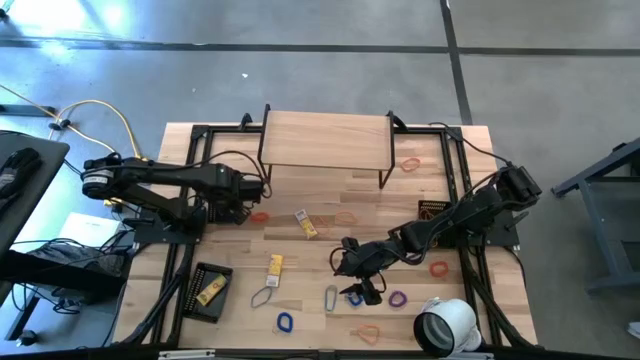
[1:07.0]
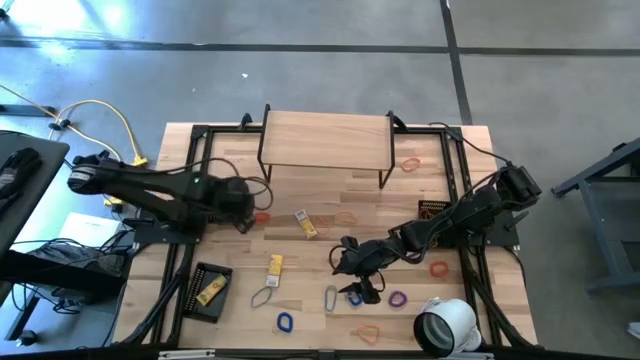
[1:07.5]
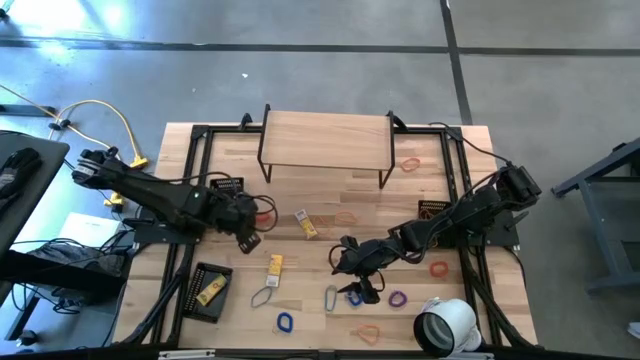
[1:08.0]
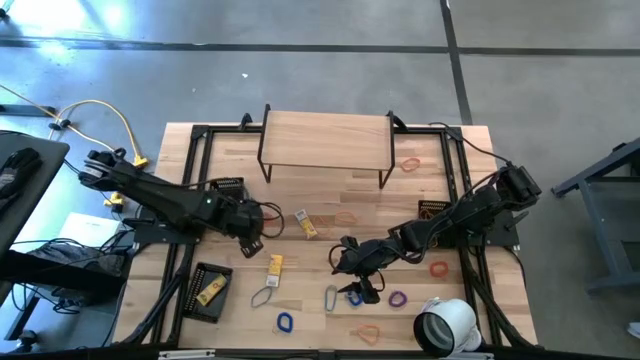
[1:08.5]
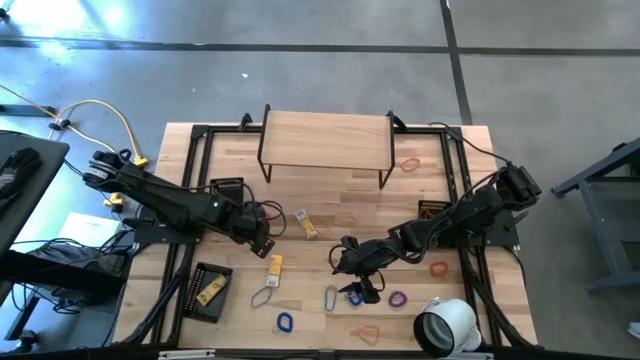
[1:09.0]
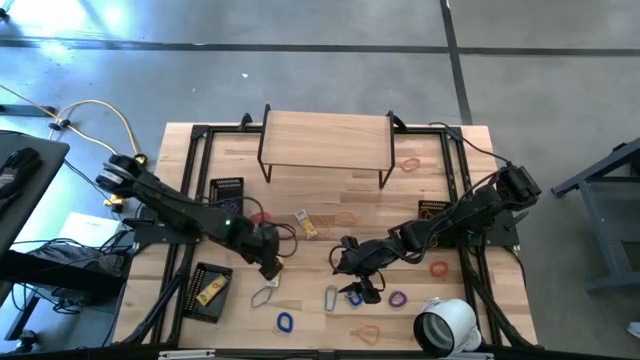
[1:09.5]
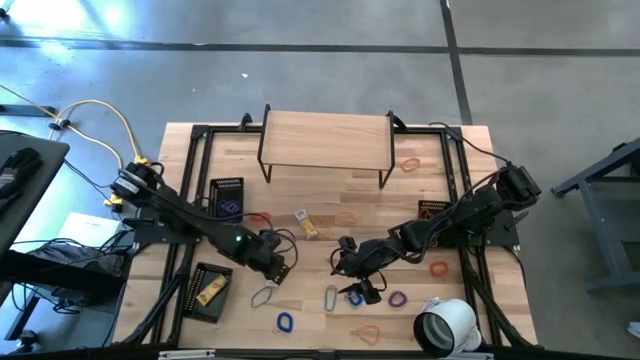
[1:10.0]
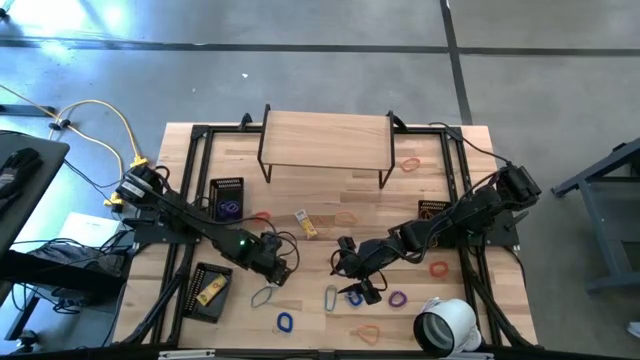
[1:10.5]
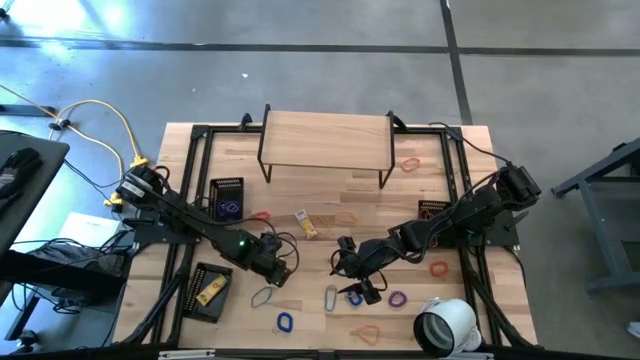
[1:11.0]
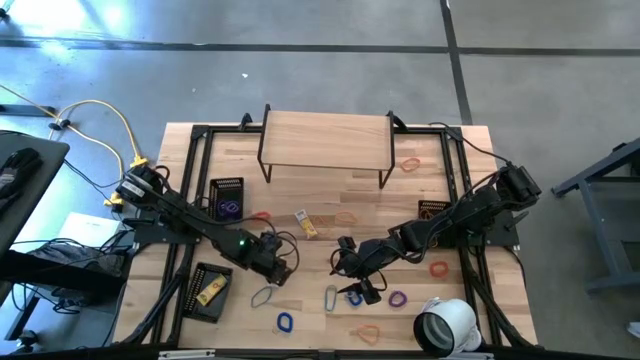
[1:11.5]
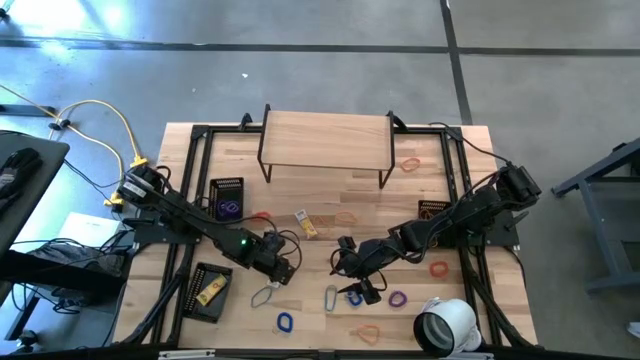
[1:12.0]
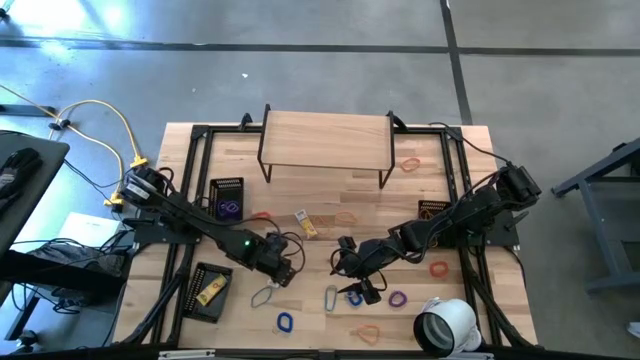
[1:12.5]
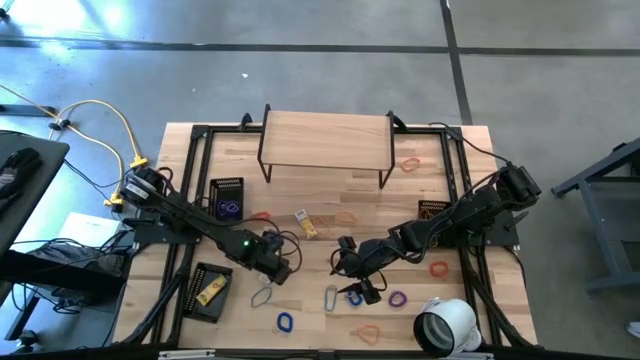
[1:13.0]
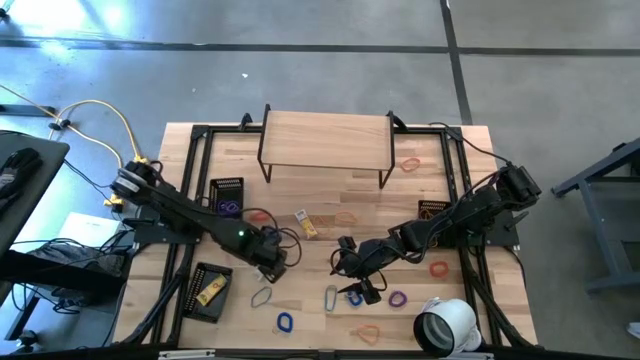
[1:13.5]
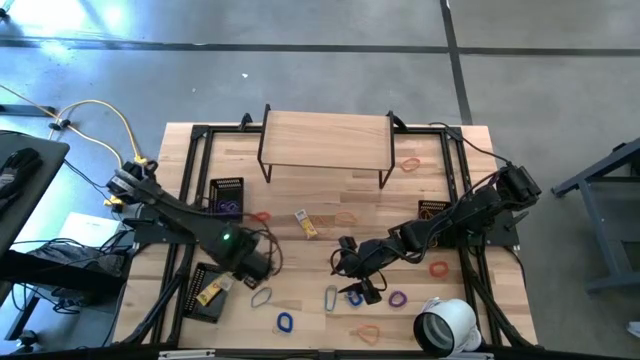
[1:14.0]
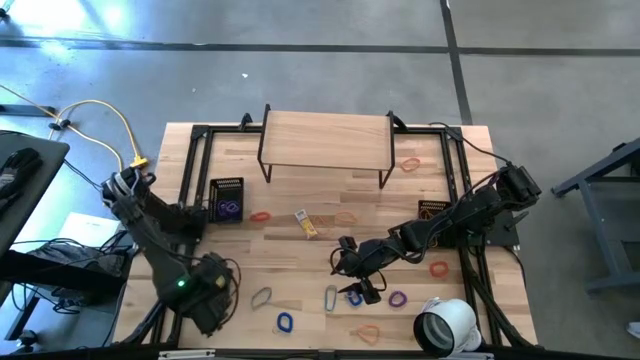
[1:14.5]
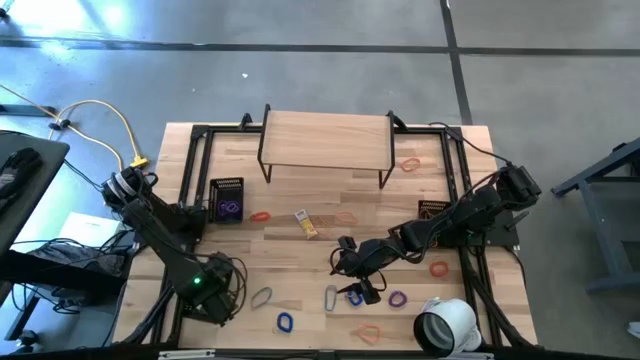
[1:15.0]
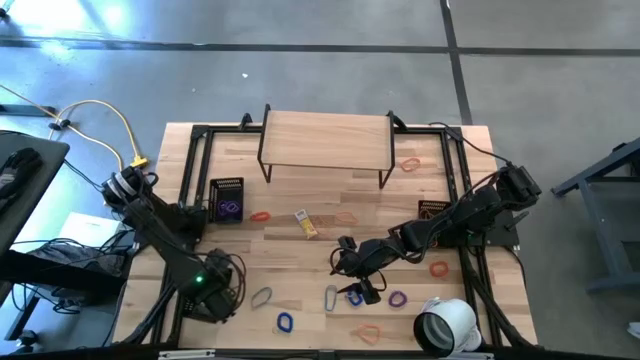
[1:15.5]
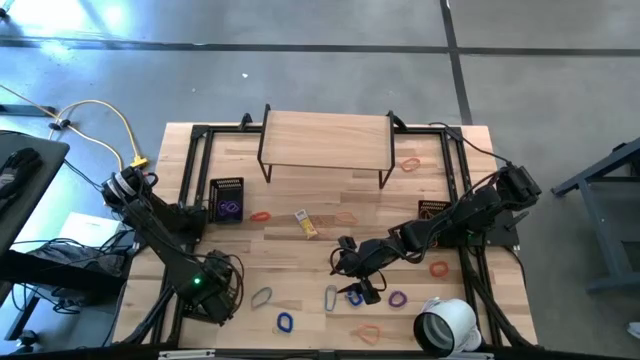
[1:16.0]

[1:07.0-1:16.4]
Task: Pick & Place Office Desk Supplies
Put the yellow crayon box into the bottom black bin

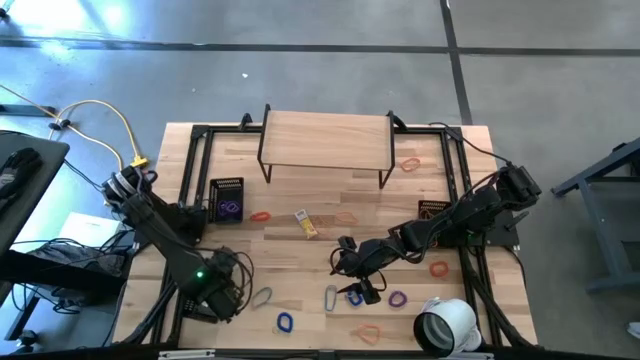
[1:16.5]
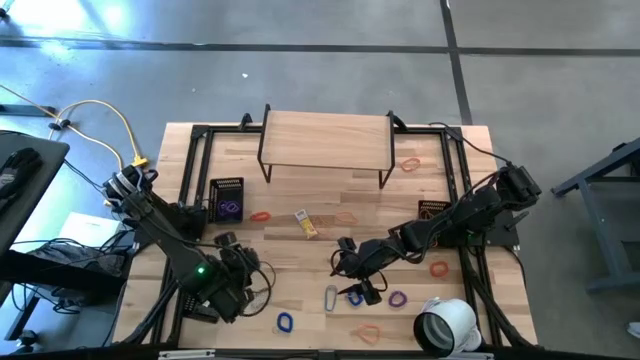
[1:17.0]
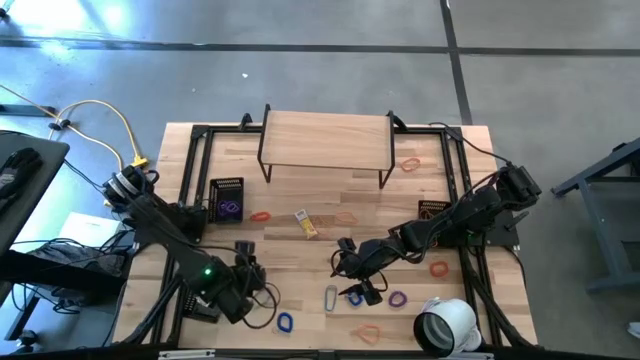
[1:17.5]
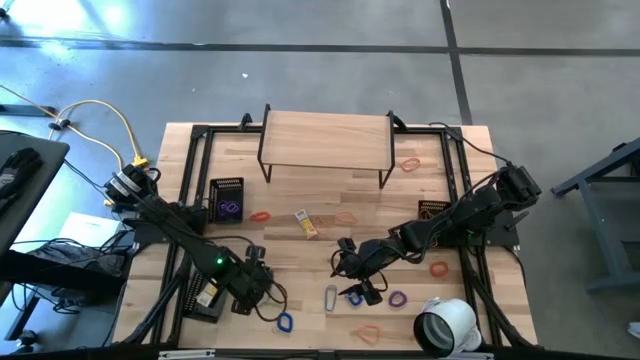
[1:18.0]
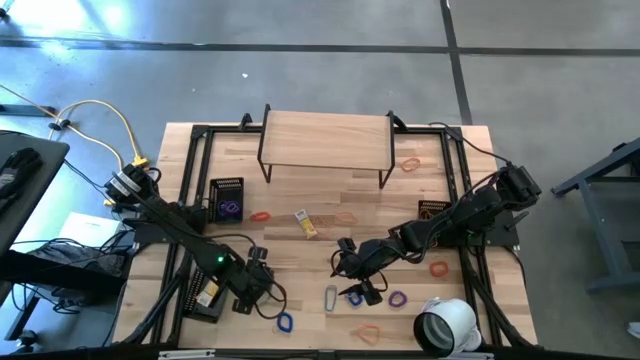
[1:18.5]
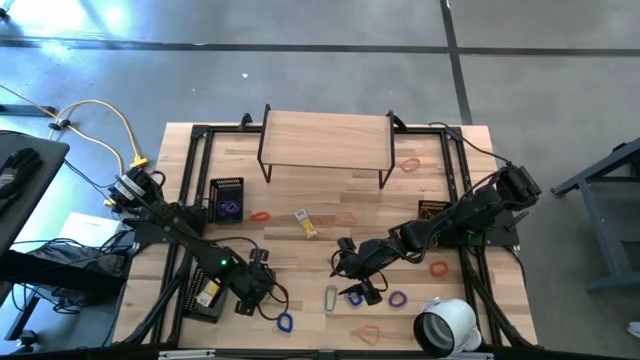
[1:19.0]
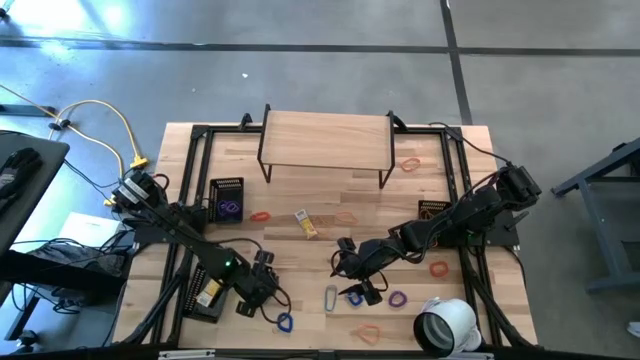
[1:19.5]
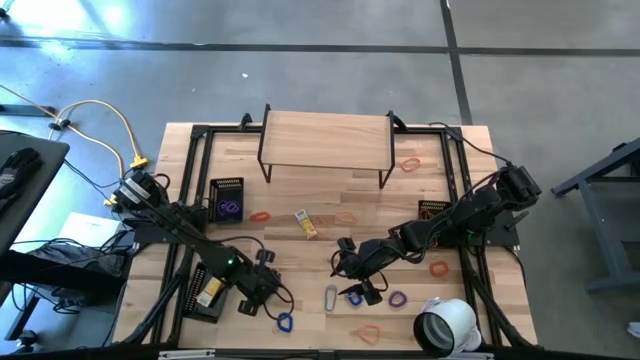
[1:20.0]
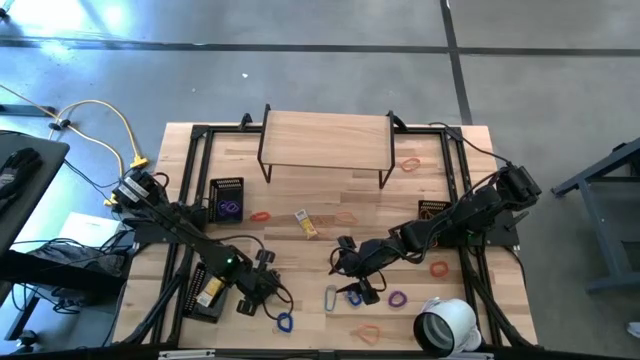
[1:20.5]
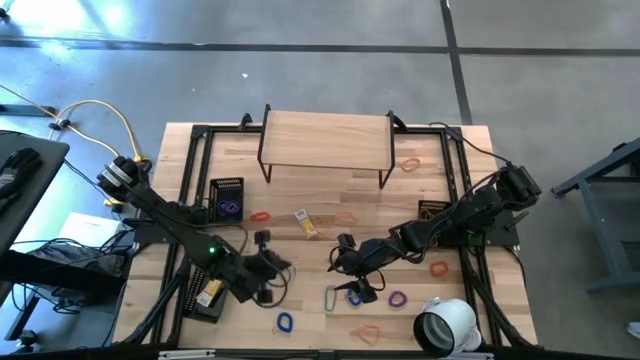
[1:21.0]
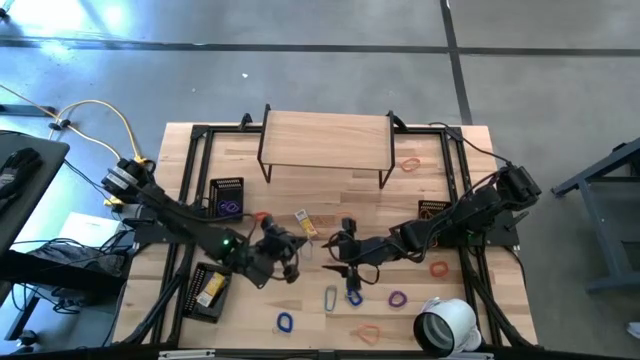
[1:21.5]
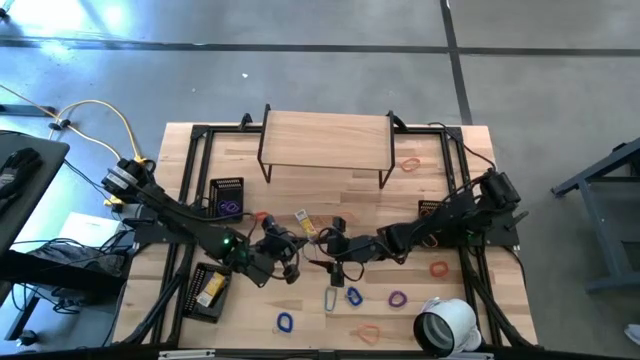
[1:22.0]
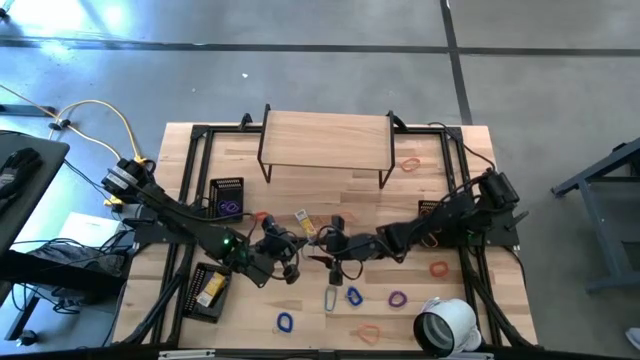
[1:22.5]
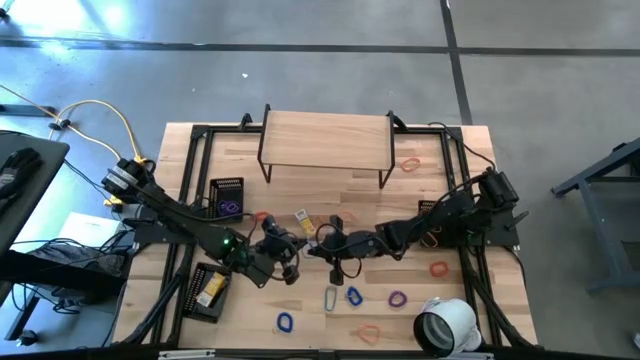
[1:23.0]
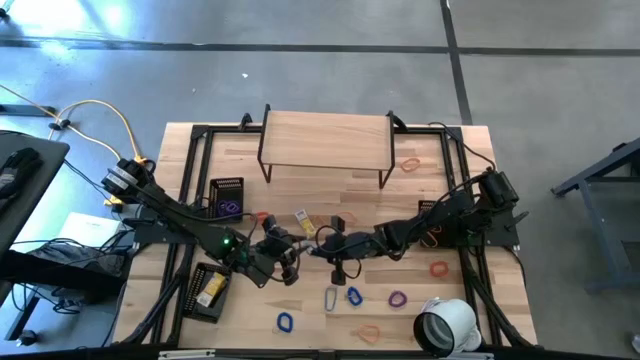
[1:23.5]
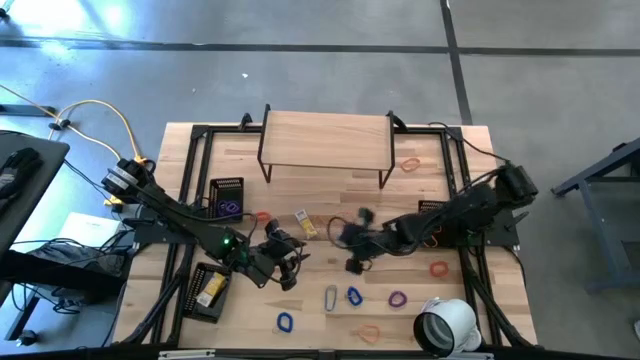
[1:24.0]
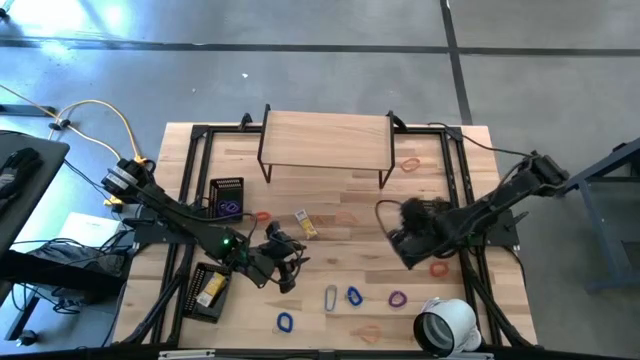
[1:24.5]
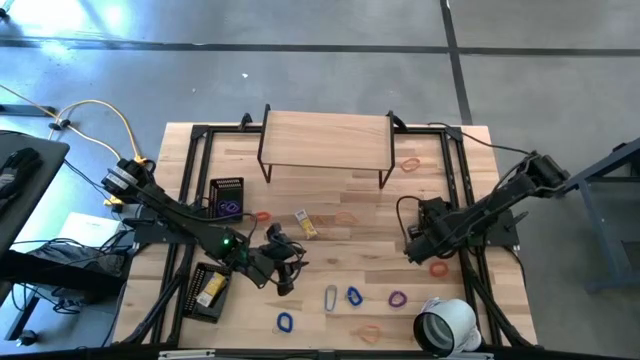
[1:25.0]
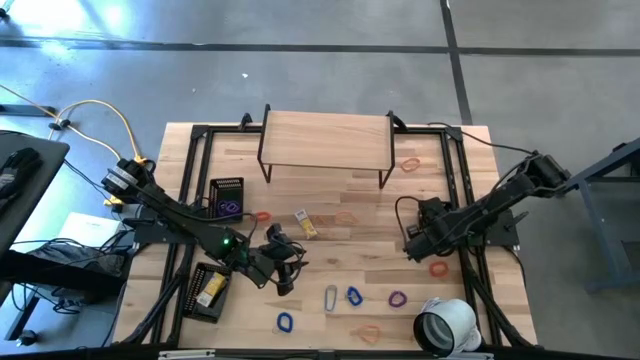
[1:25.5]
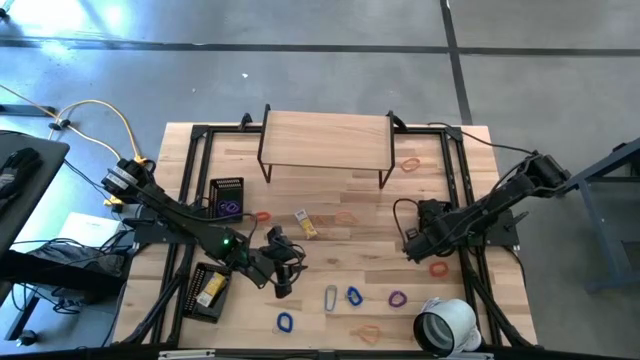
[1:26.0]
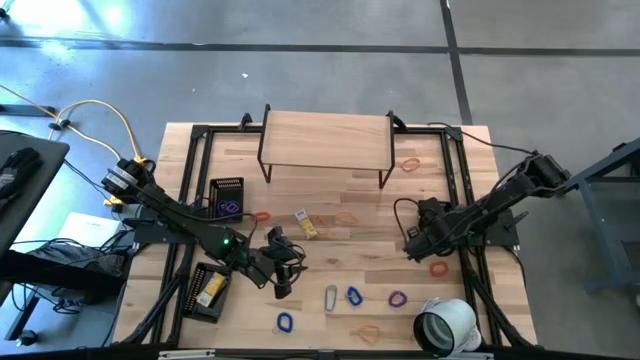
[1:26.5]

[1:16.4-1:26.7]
Put the blue rubber band into the top right black bin

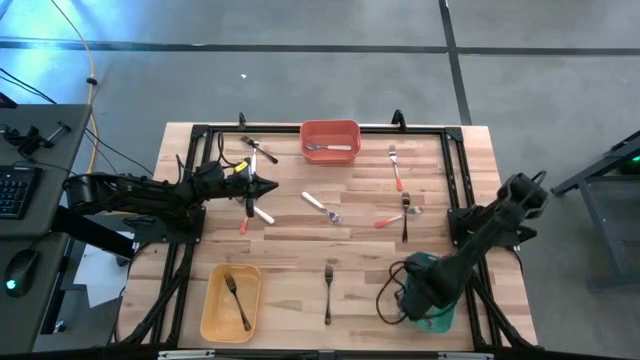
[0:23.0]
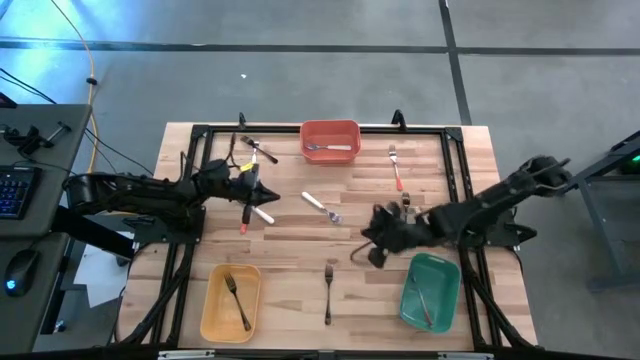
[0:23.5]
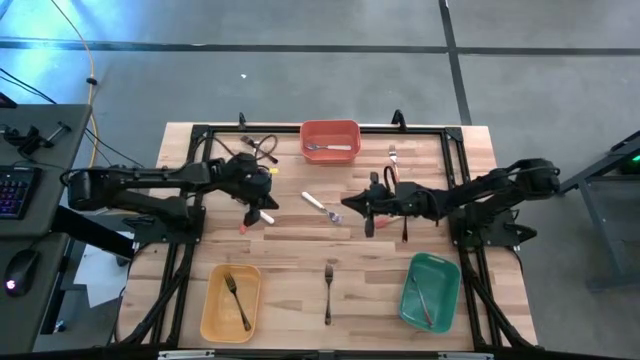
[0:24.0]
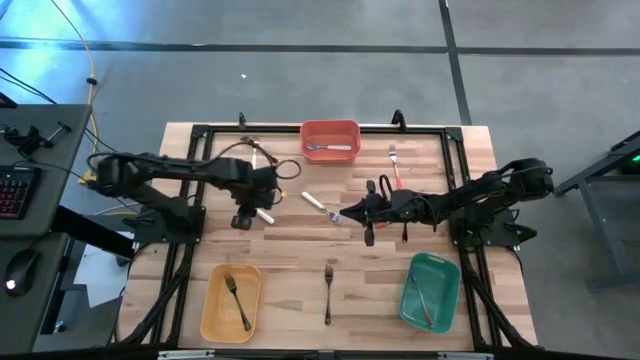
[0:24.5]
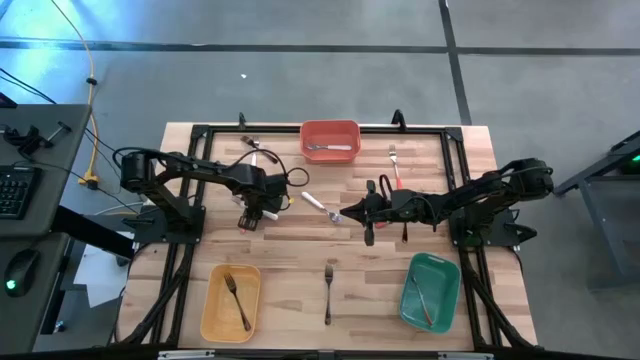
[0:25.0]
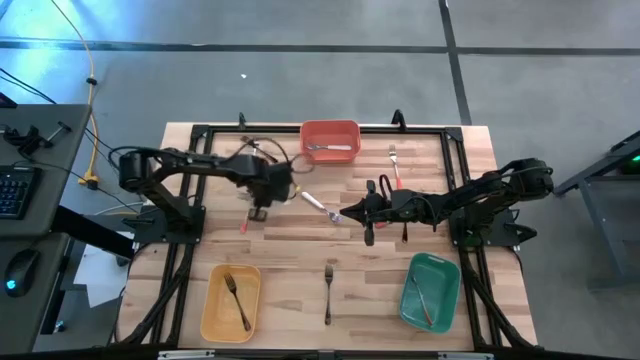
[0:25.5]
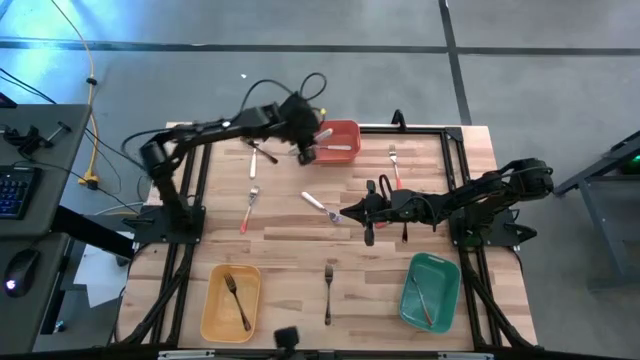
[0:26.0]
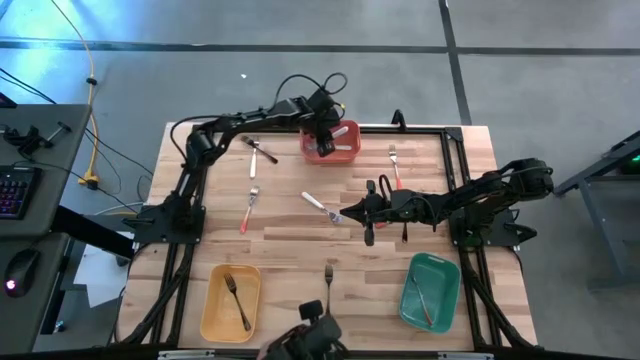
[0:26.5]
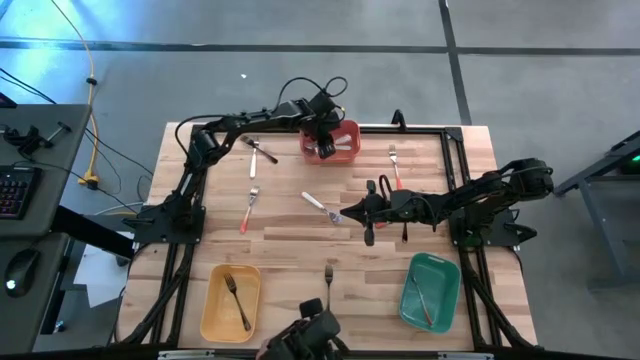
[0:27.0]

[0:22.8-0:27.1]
Task: Sort silverware by color (type)
Put the bottom left white fork into the orange bin
